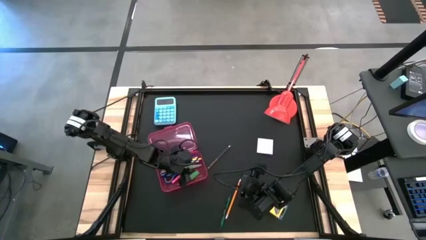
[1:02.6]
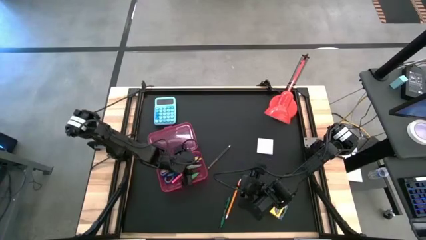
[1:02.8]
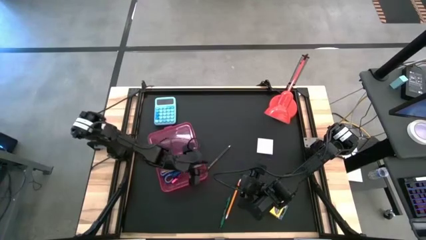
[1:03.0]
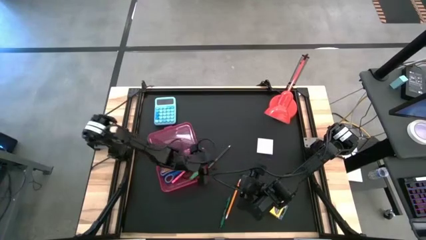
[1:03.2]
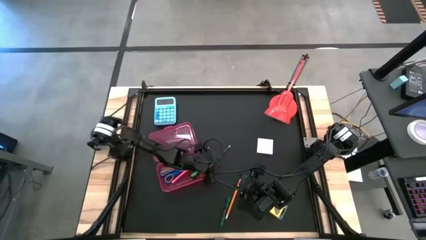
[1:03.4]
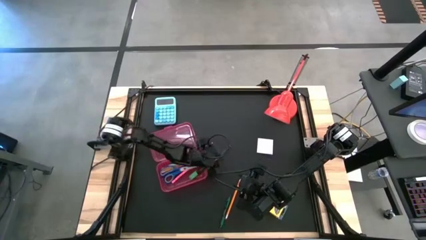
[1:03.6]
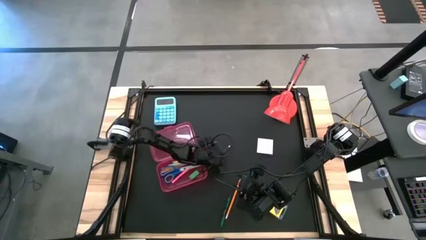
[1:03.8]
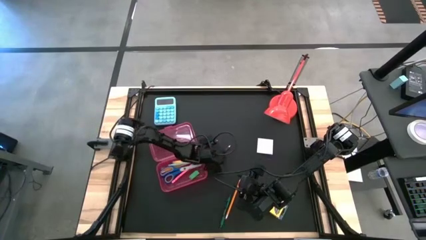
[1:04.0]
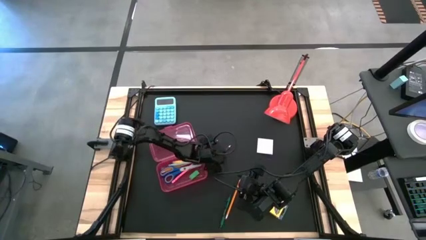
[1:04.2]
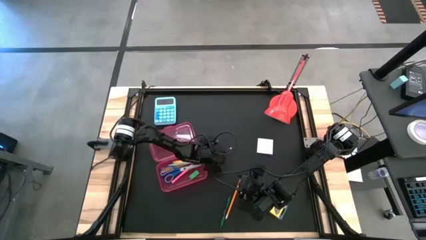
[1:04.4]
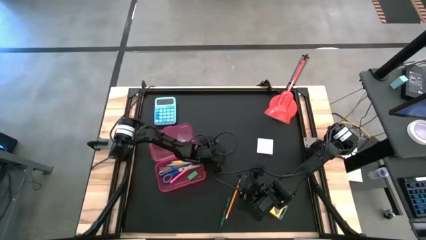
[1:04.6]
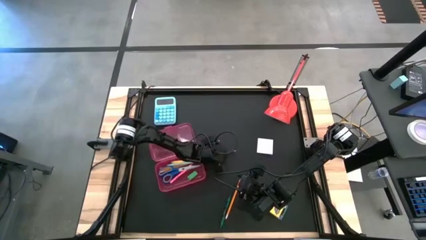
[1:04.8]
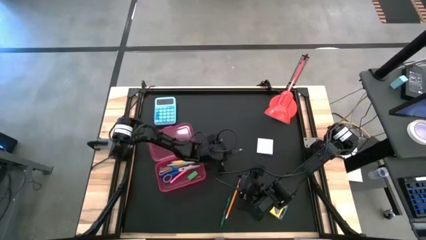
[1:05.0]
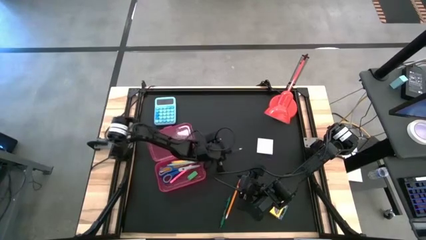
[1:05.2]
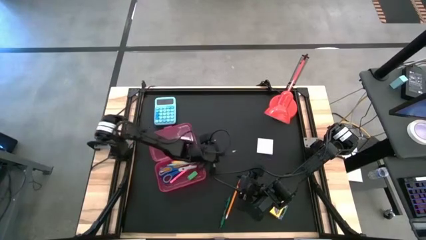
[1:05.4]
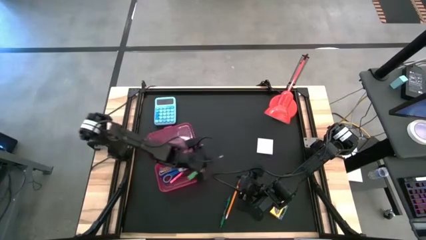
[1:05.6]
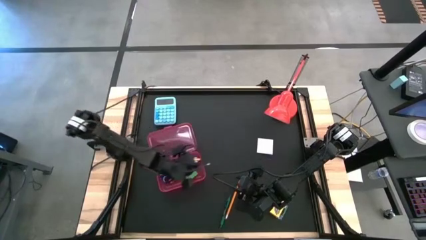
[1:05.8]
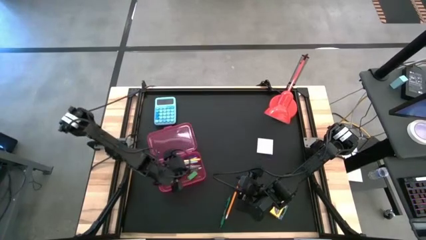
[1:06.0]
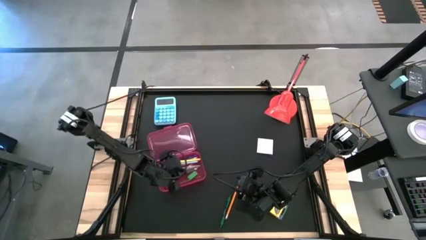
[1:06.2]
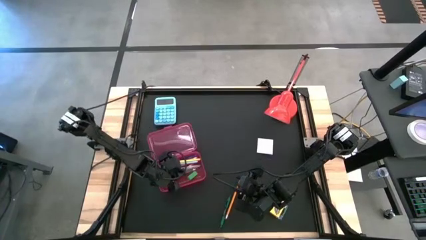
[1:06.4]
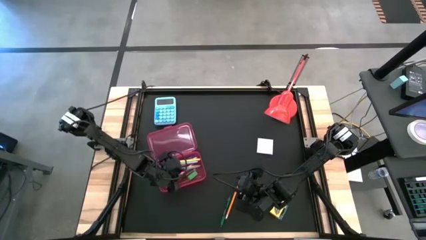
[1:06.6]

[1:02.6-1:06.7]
Task: Pack school essentials
Put the blue pencil into the pink supply box

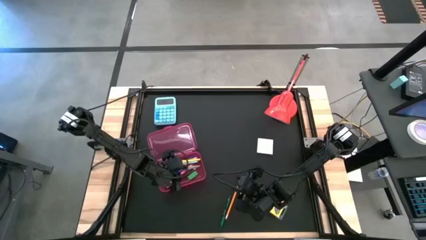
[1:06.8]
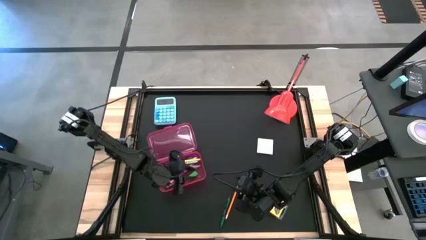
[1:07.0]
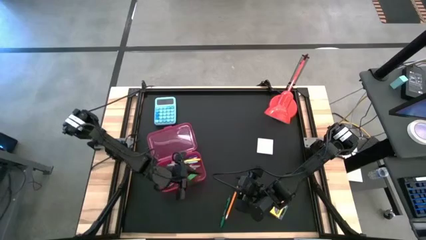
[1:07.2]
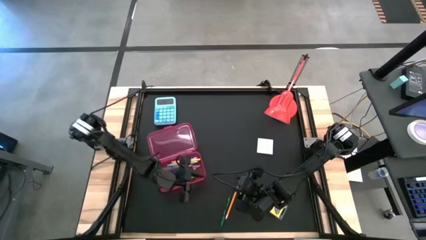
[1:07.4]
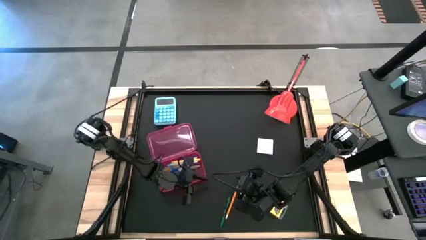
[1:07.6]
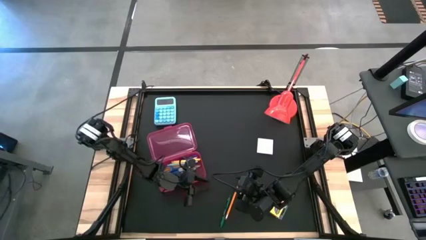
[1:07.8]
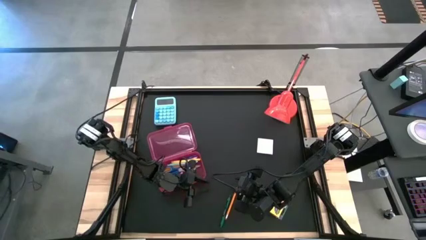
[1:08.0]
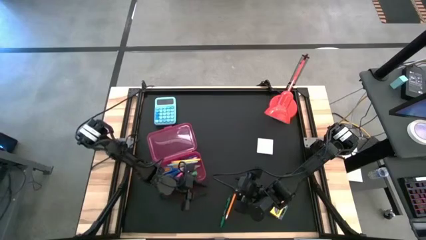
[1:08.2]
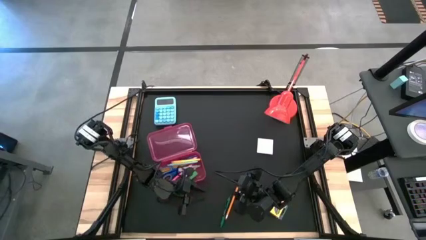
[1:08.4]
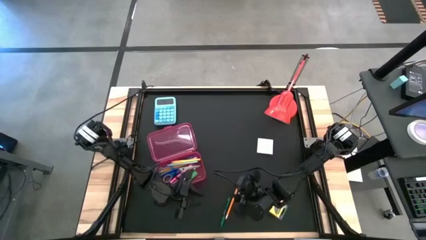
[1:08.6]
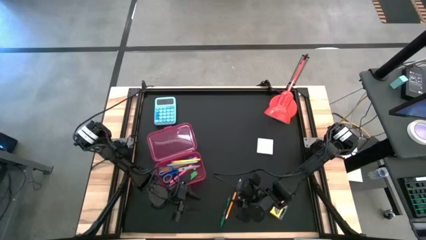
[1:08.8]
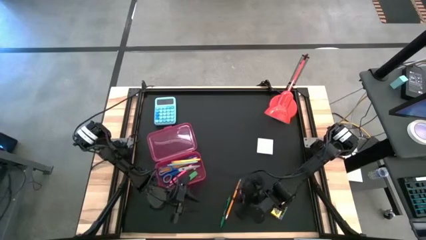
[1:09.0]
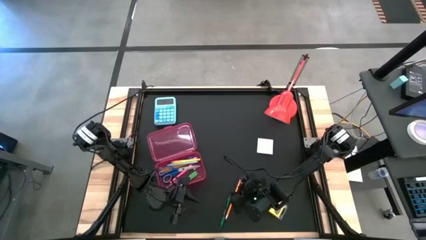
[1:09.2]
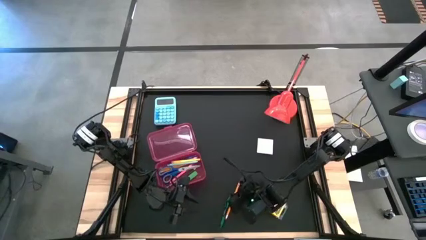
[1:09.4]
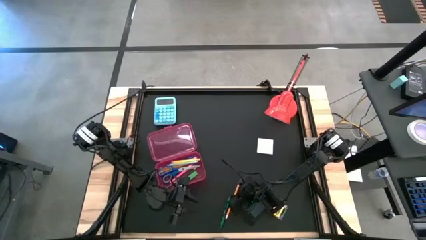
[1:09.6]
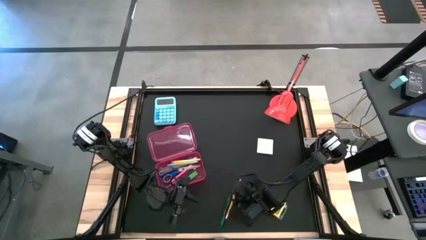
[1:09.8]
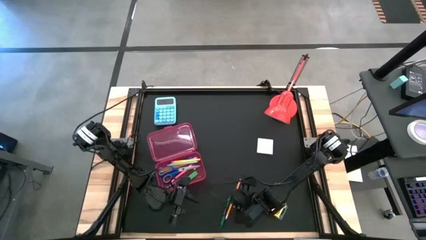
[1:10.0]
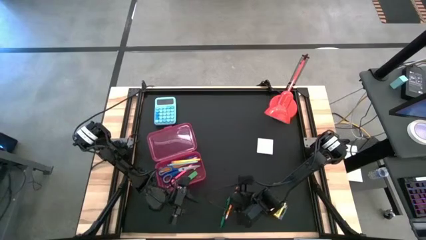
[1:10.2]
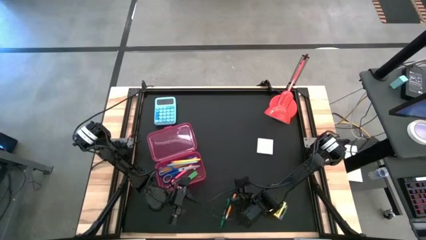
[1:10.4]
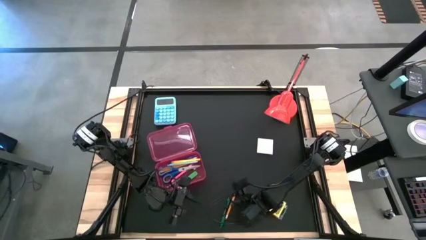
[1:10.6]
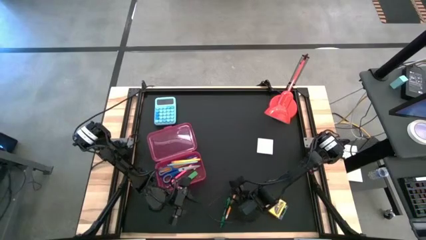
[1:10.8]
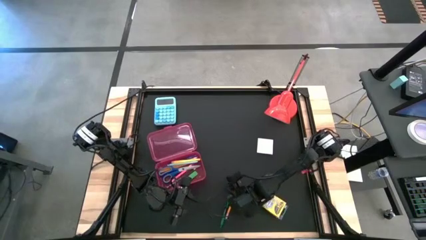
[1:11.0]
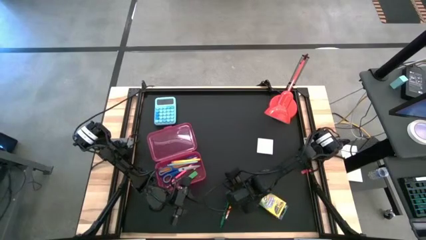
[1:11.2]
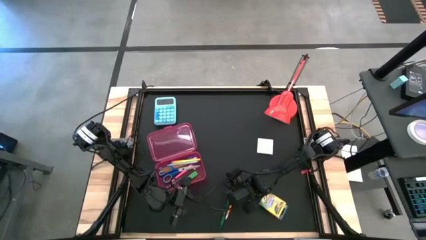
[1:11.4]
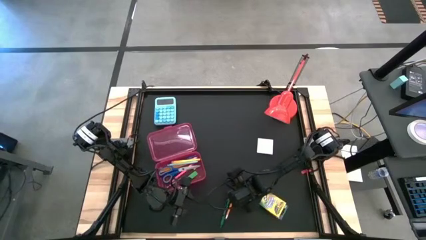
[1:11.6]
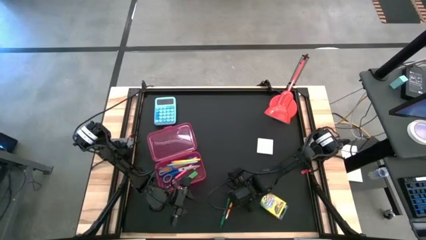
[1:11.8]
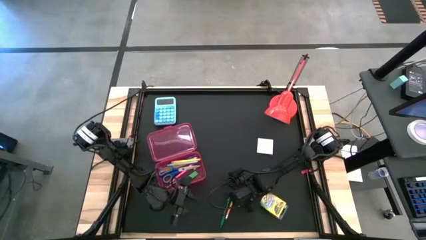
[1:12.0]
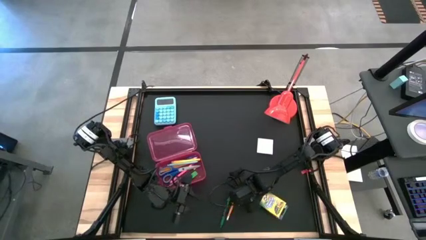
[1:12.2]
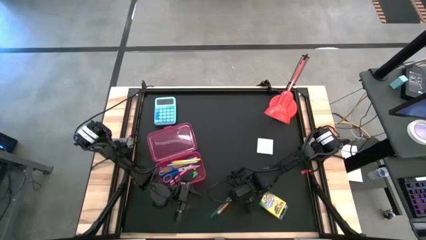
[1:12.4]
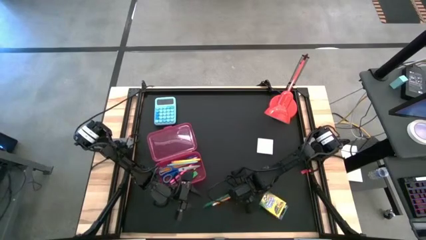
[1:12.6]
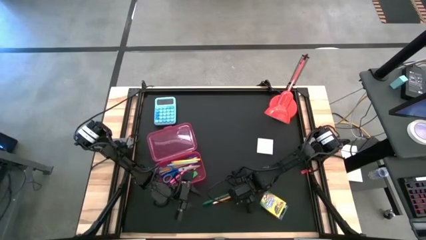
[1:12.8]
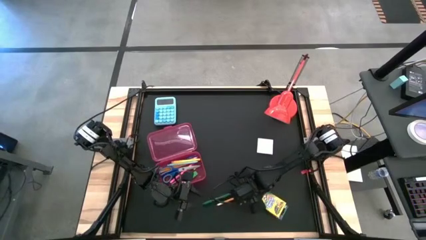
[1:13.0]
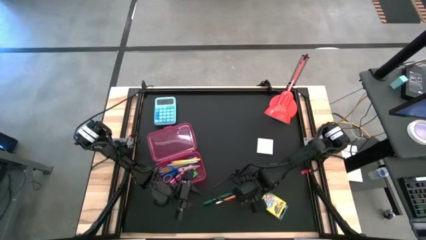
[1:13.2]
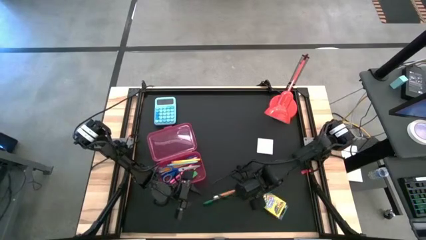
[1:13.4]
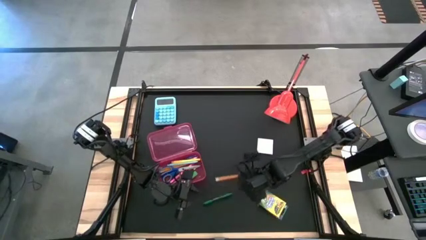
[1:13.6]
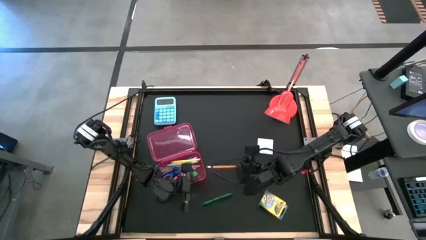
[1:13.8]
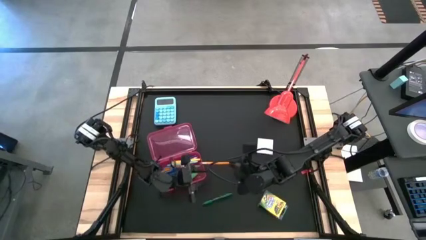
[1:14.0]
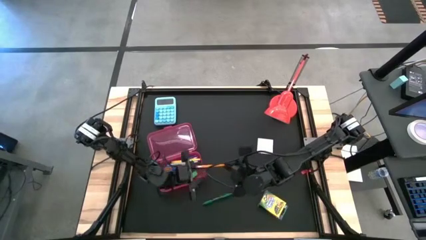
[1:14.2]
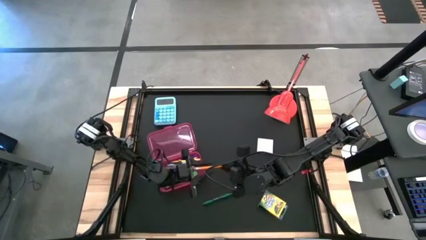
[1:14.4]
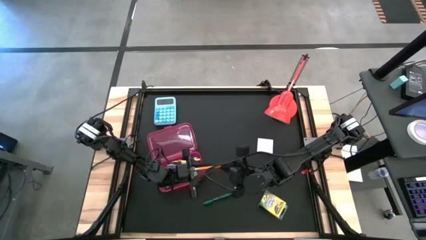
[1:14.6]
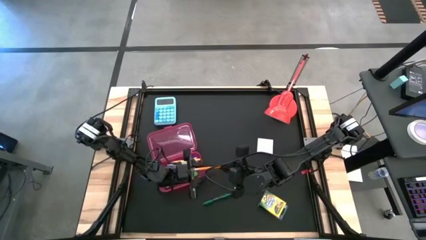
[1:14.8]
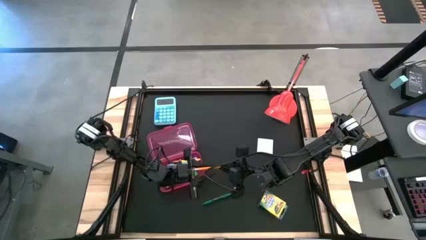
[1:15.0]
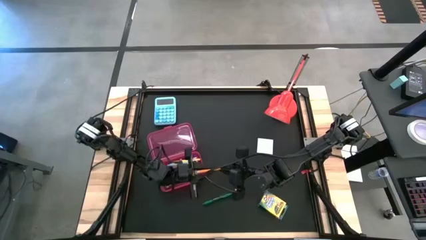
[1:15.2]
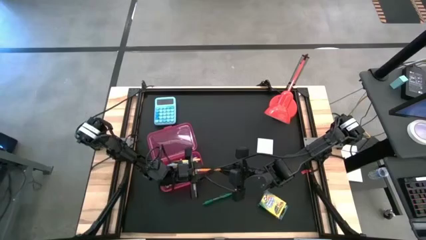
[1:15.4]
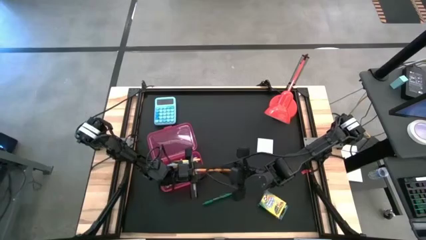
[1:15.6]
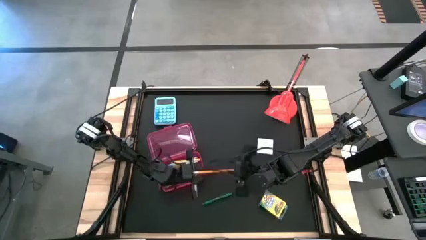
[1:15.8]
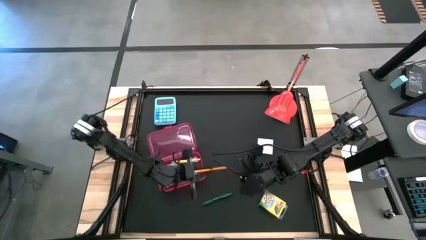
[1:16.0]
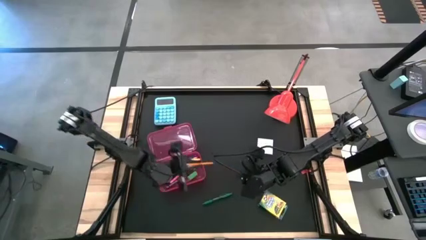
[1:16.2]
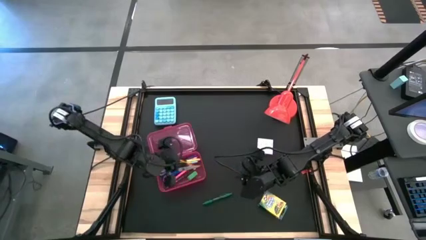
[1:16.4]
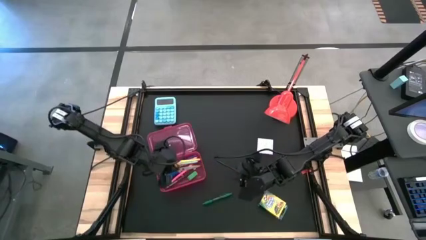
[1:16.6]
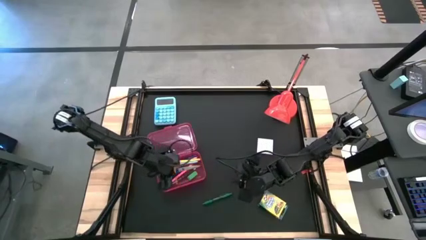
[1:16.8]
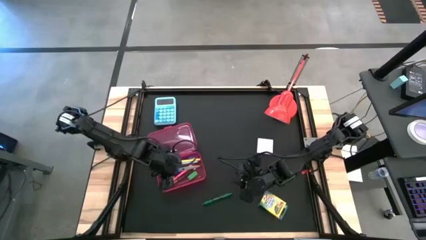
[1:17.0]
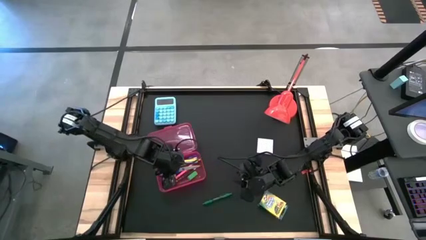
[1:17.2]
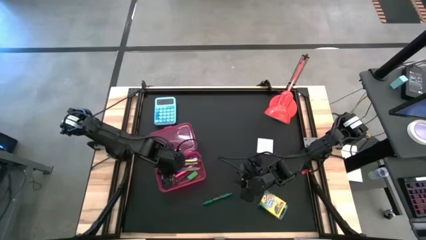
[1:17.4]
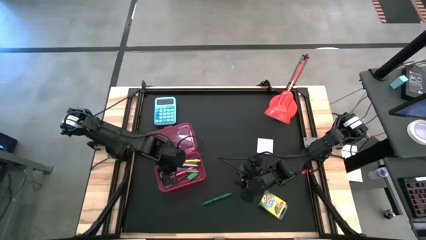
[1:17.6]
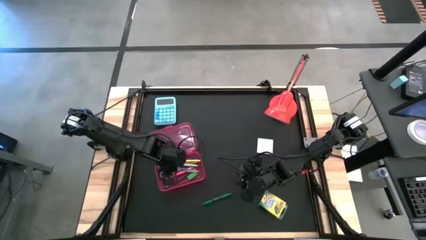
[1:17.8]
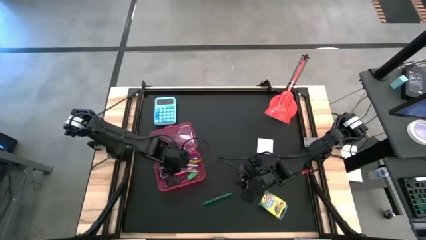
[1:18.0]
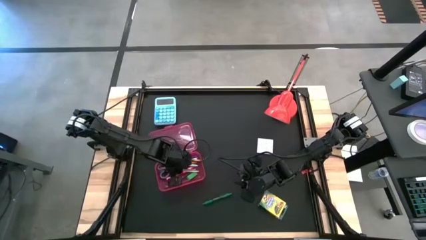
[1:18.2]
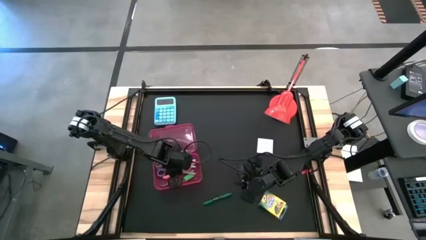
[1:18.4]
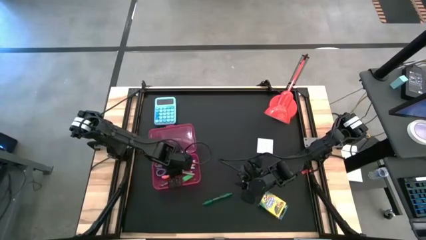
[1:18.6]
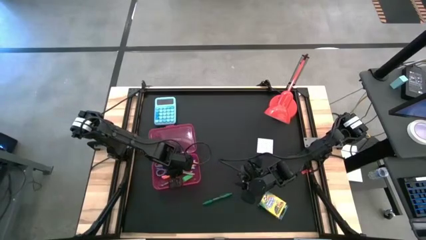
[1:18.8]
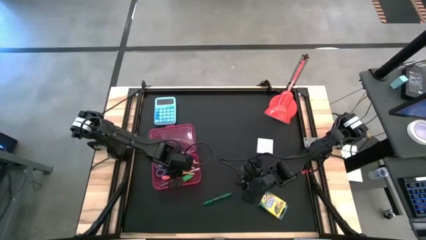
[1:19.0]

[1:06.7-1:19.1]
Put the yellow pencil into the pink supply box
